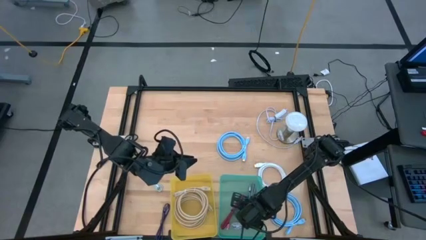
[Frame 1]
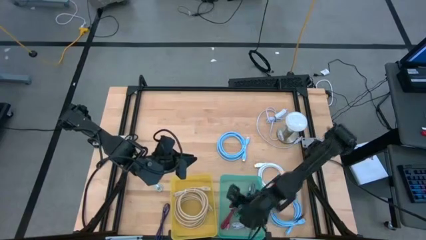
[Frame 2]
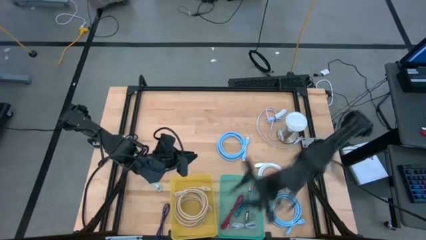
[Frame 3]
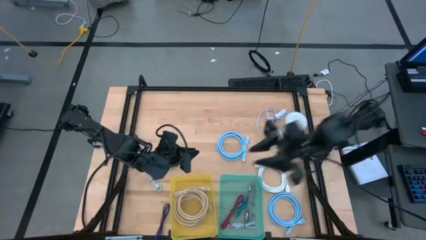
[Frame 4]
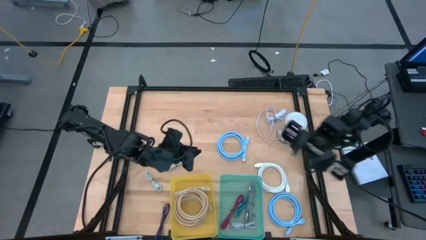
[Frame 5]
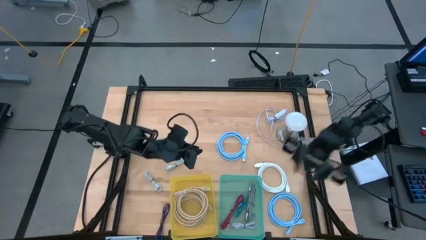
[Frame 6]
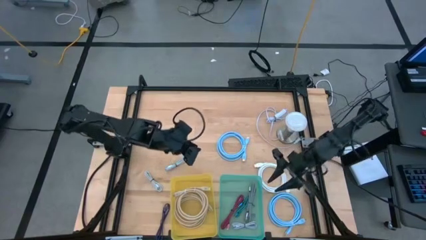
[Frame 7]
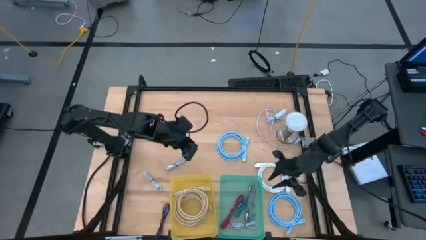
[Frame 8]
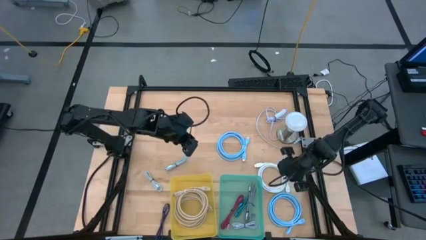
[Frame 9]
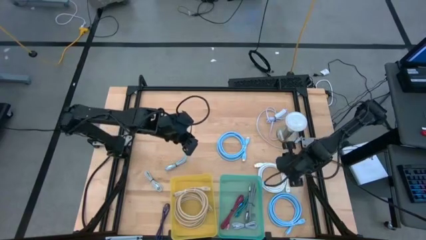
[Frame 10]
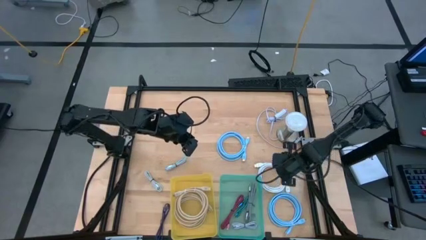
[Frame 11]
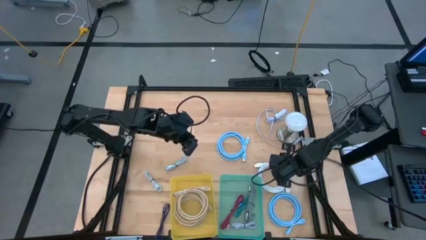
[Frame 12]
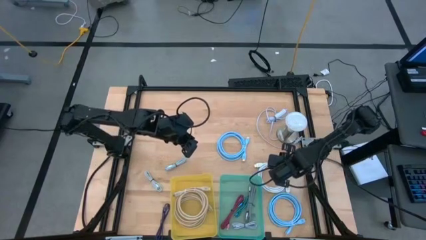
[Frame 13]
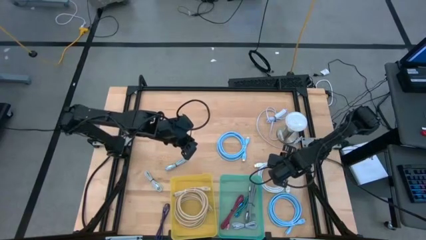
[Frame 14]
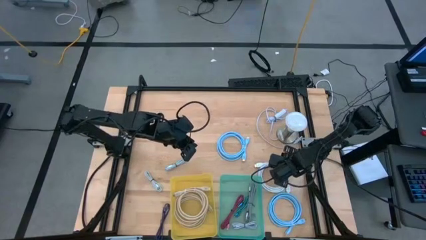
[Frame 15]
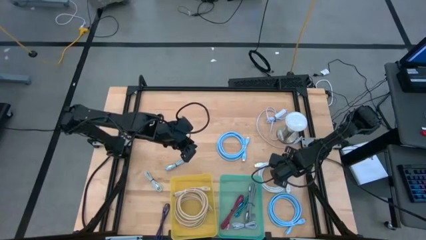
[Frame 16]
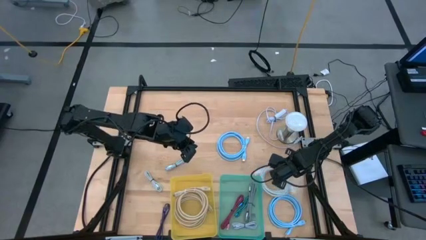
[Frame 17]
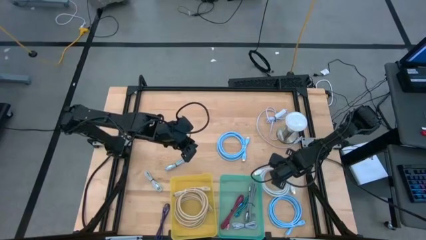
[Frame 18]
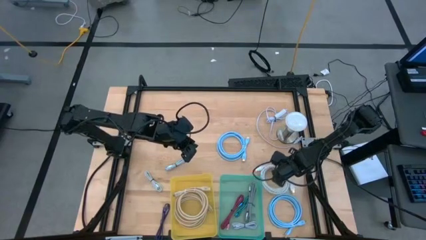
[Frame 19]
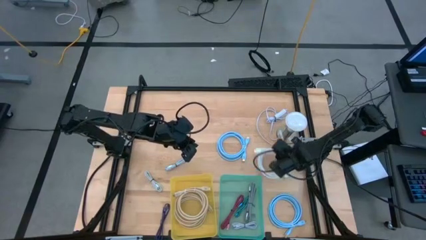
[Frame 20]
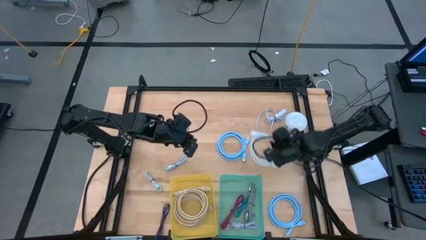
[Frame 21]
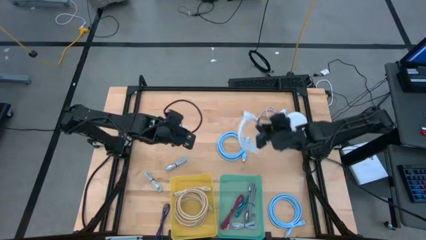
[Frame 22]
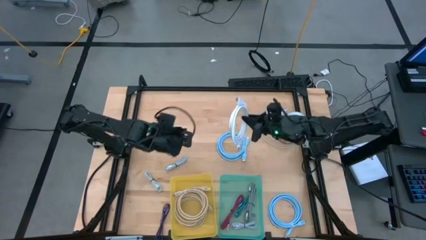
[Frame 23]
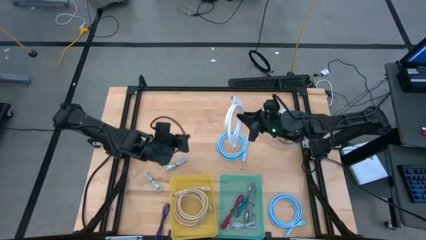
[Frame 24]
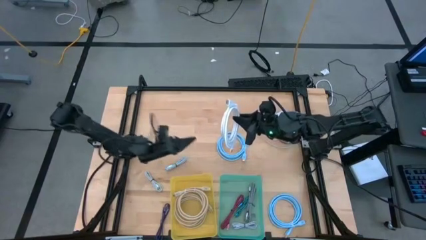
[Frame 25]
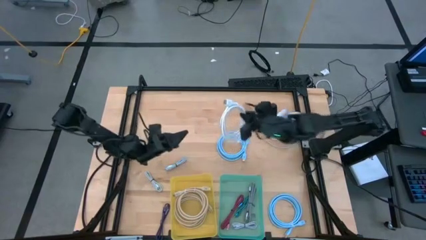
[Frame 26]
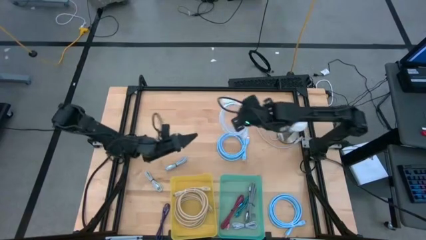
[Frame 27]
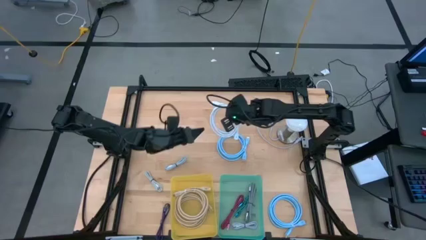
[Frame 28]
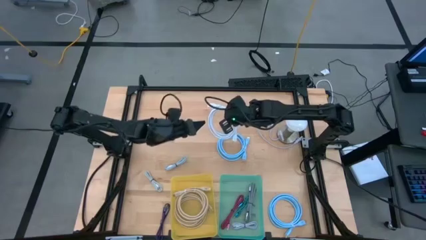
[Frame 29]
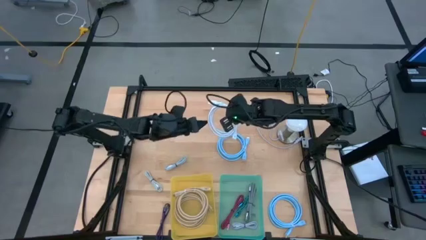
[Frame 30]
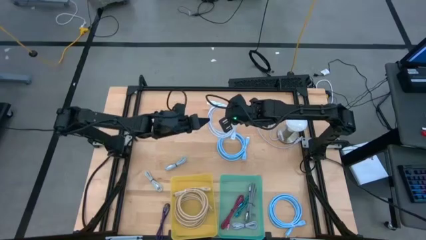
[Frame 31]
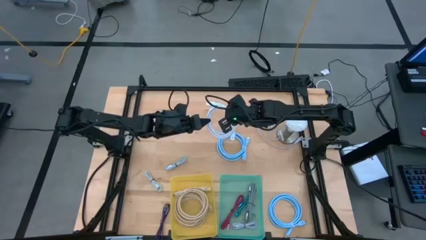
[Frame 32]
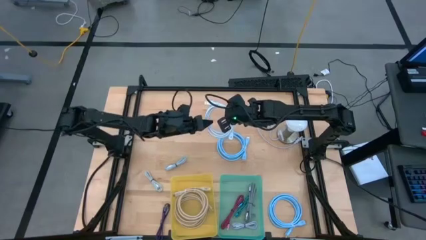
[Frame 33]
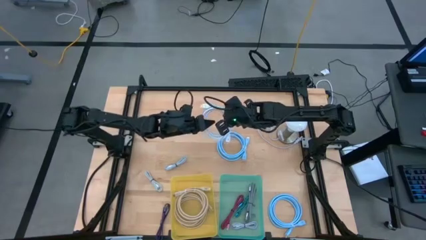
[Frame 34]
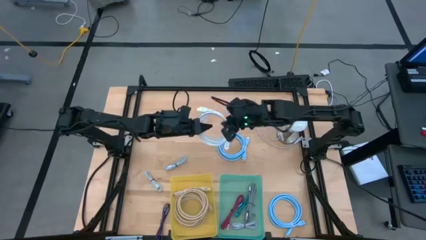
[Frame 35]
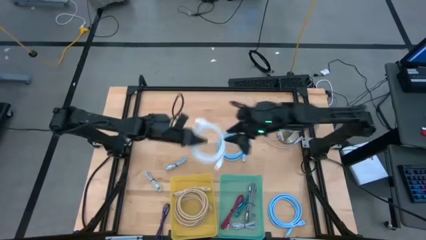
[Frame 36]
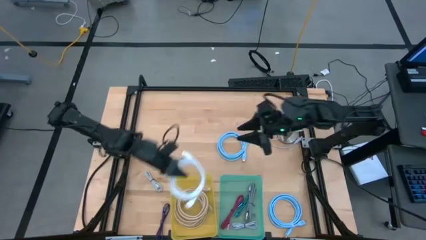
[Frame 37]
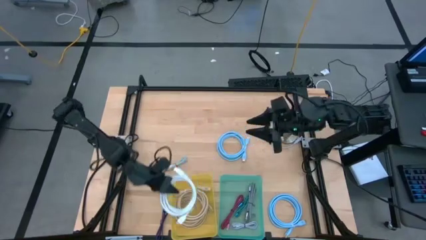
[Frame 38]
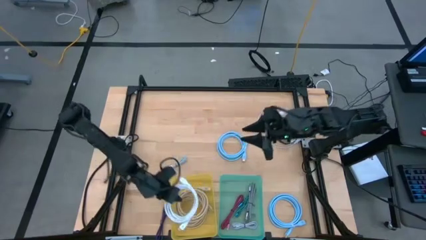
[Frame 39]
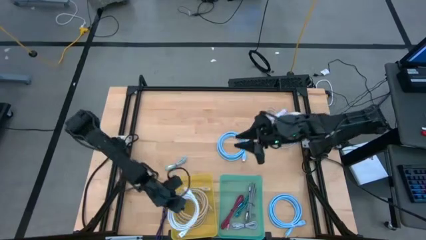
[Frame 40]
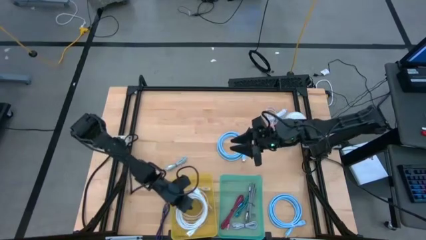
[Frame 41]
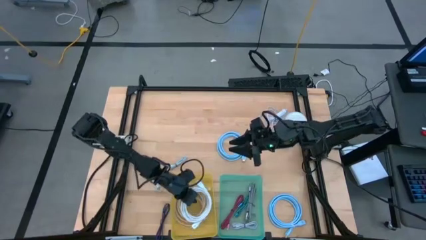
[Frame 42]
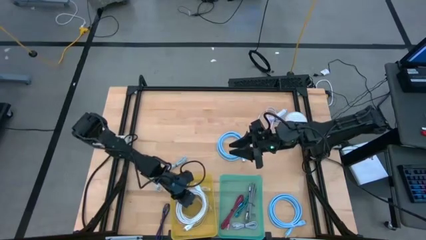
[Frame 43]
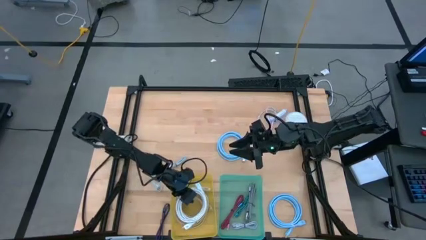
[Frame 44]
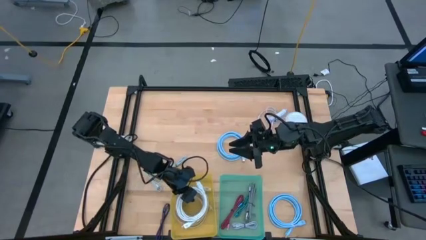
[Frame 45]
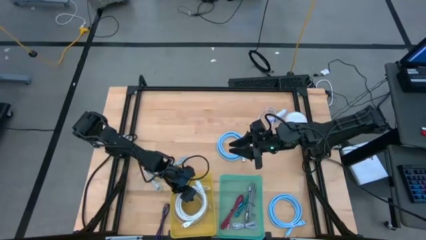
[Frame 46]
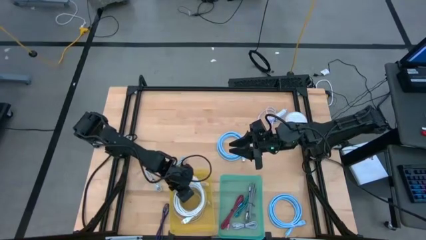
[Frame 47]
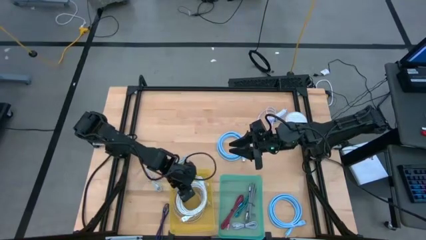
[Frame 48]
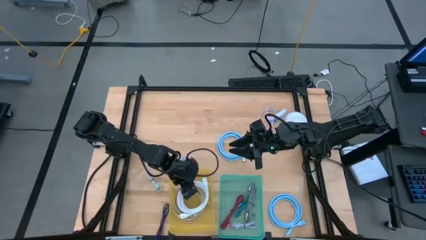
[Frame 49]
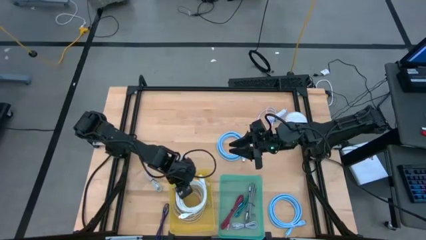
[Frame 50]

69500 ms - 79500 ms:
Task: Pick & Place USB Port
Put the large white charger cable into the yellow bin

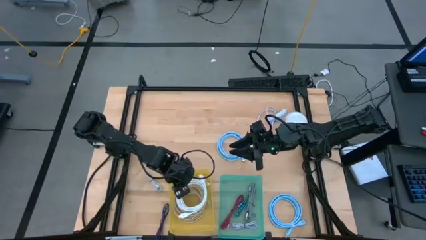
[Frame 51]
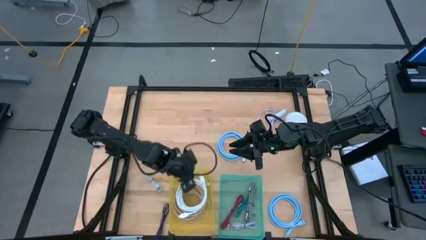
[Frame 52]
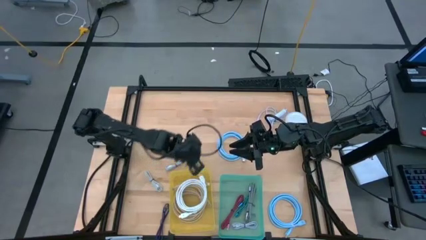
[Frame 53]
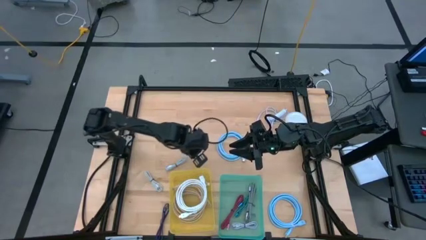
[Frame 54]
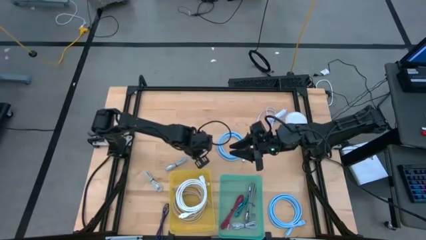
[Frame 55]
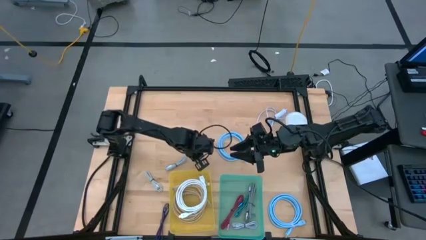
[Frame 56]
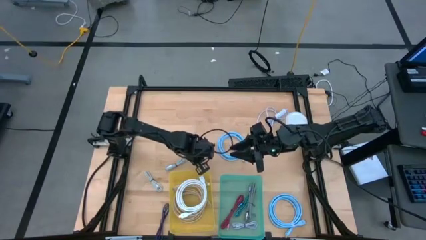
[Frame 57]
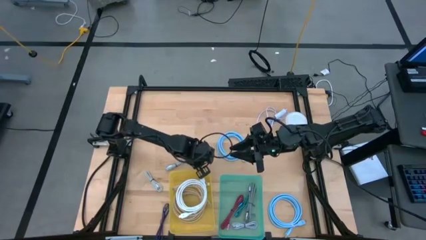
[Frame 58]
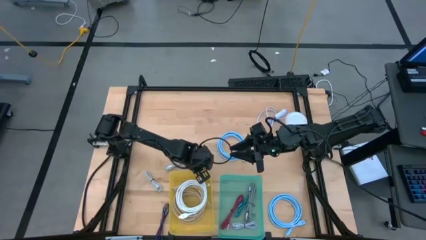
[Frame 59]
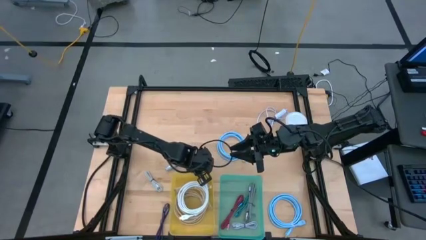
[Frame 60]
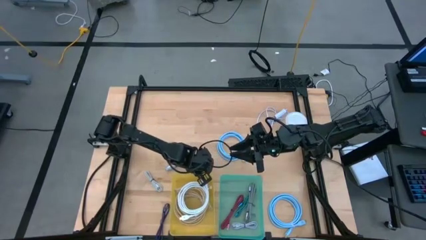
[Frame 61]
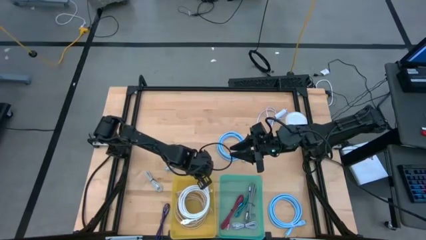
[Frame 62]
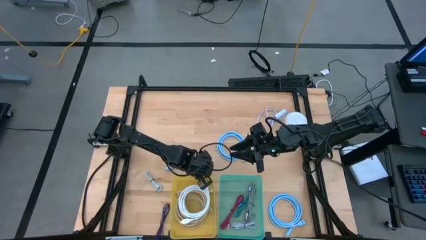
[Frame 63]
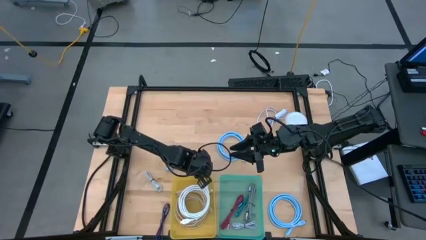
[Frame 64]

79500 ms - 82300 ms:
Adjust the yellow bin

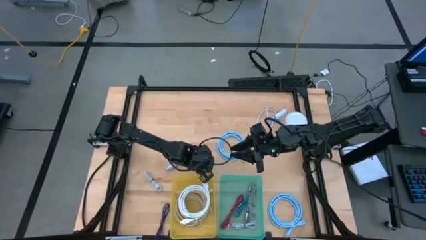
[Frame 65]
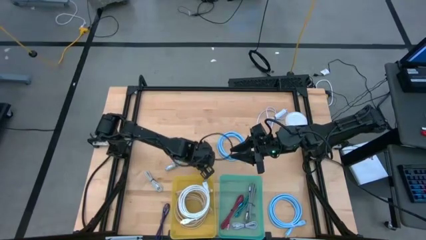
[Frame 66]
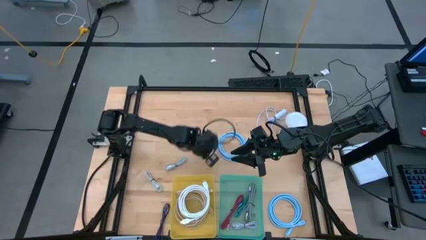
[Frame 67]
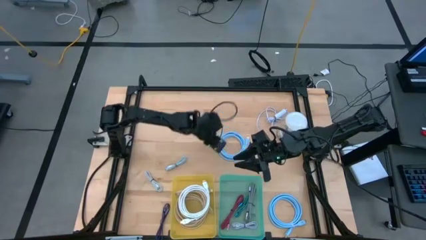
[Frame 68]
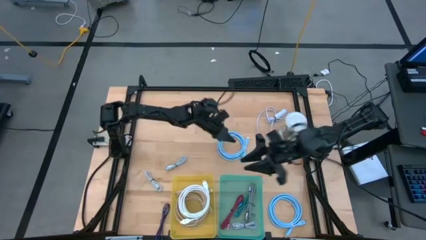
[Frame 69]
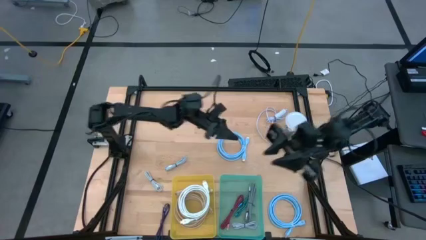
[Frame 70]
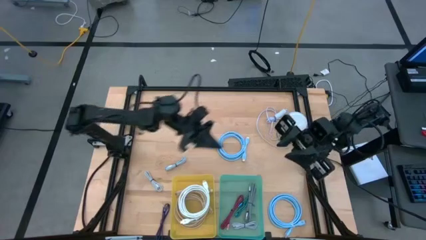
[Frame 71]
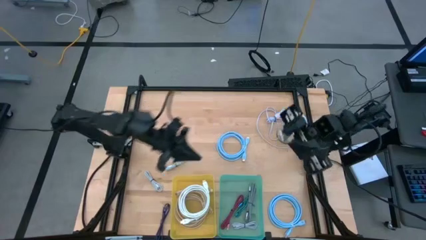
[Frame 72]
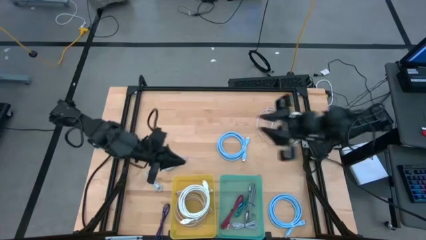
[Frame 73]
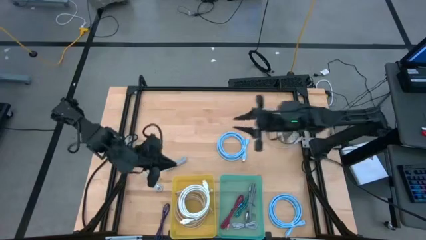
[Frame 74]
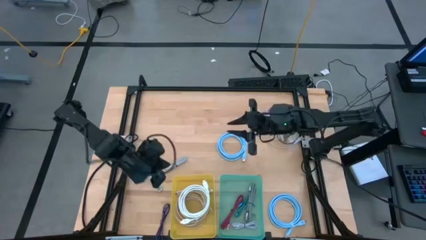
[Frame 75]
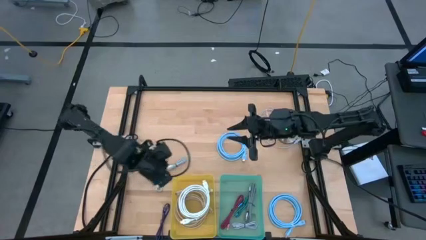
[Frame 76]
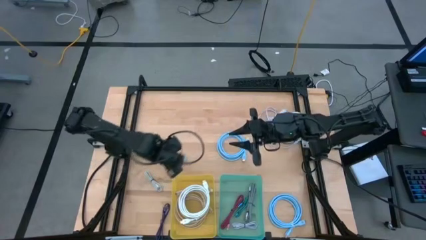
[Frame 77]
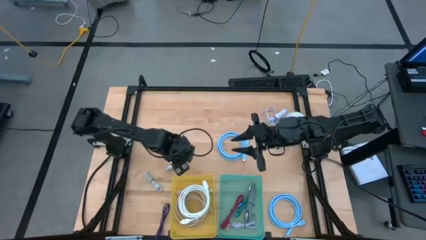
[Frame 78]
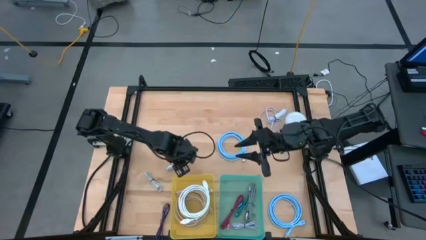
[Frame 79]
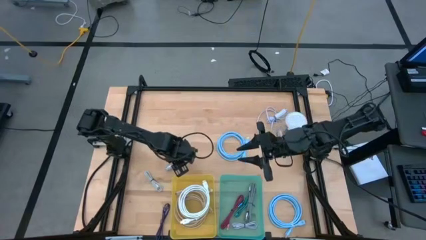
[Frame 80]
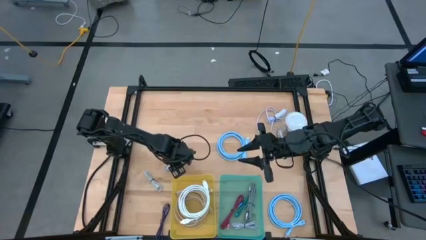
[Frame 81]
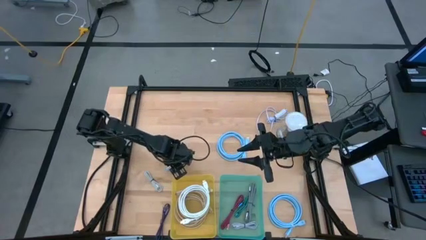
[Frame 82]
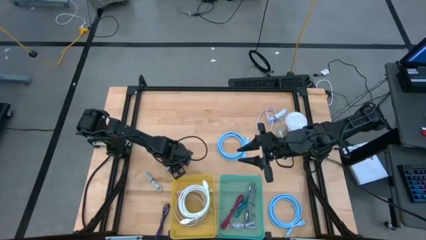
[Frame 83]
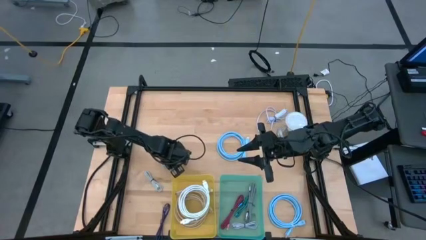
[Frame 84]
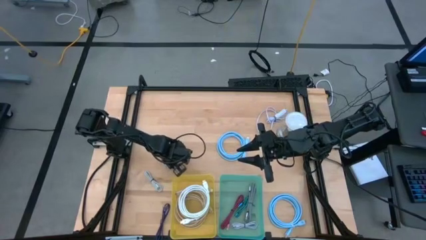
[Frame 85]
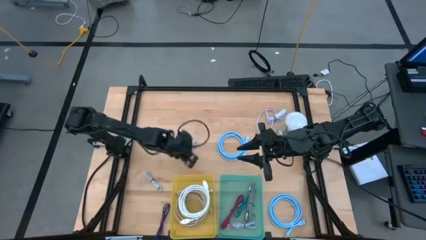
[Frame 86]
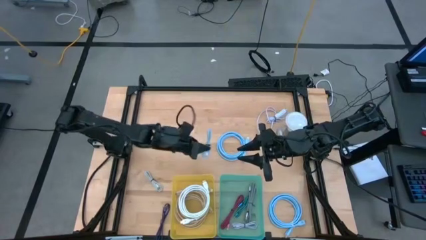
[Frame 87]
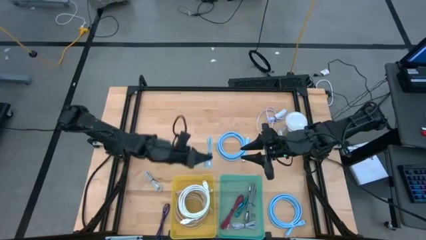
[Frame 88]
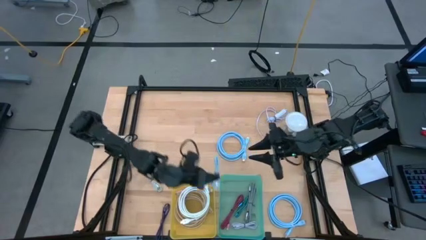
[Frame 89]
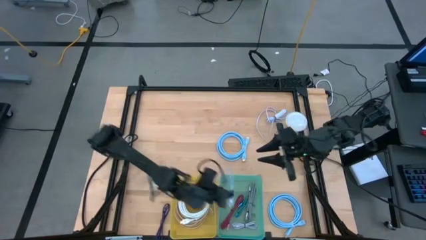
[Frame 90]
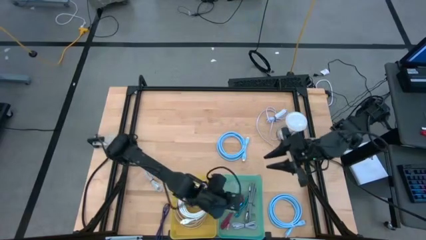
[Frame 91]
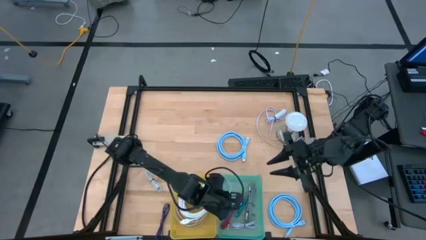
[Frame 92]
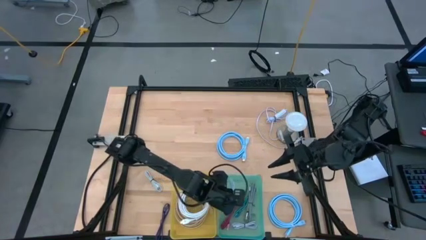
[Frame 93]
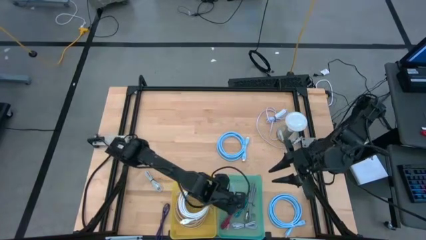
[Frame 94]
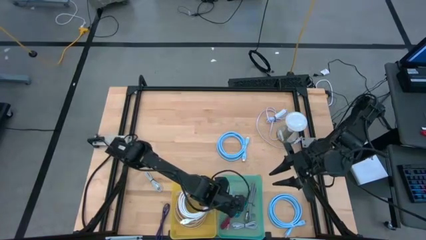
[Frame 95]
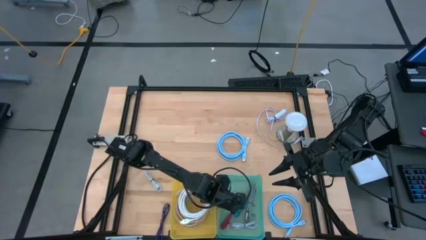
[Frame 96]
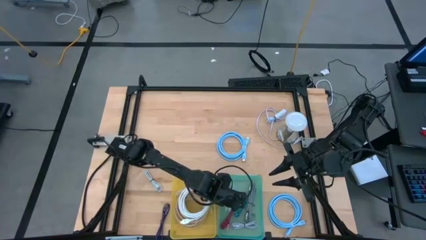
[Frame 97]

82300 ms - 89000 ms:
Put the small light blue charger cable into the green bin
